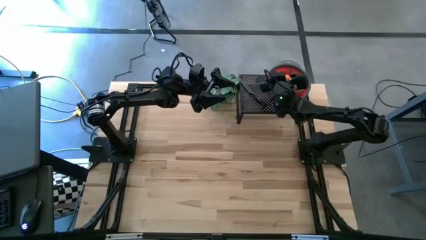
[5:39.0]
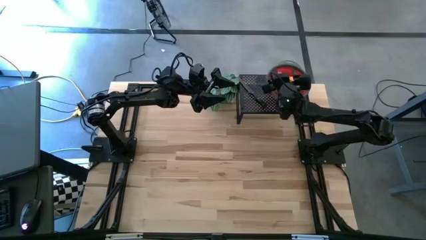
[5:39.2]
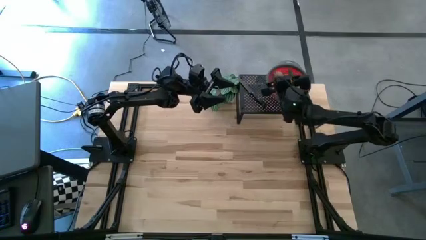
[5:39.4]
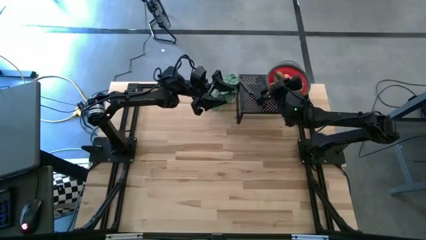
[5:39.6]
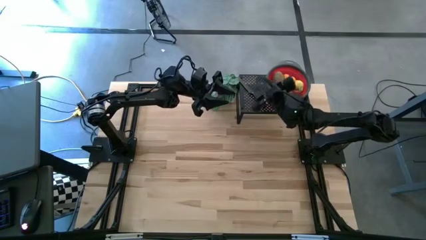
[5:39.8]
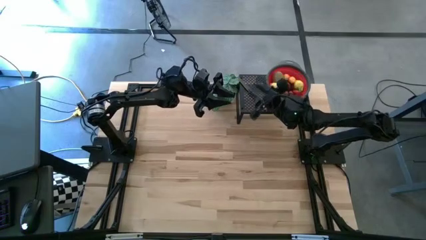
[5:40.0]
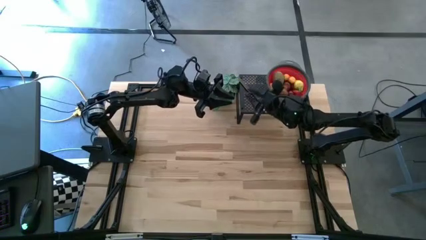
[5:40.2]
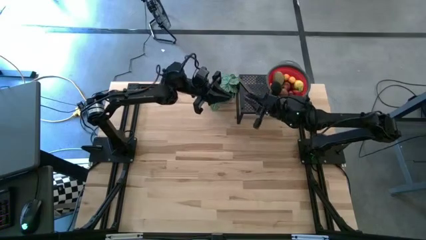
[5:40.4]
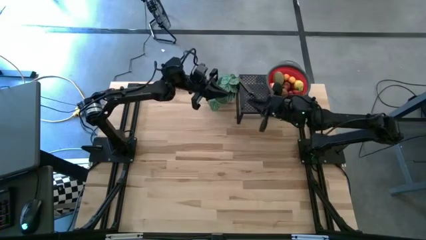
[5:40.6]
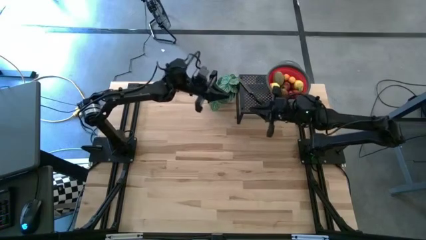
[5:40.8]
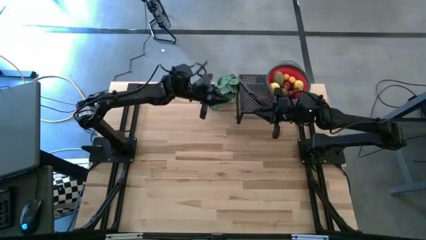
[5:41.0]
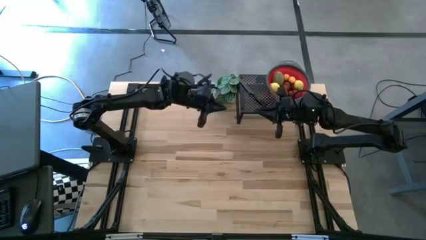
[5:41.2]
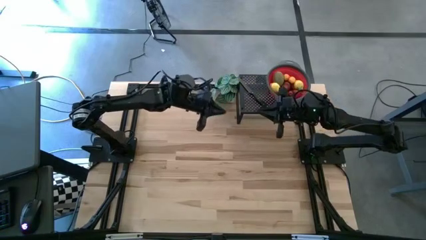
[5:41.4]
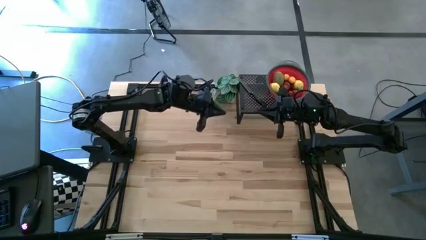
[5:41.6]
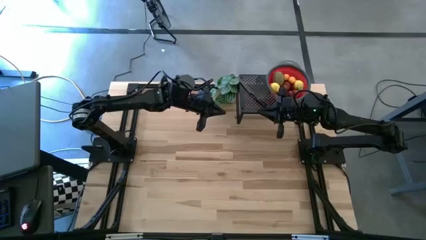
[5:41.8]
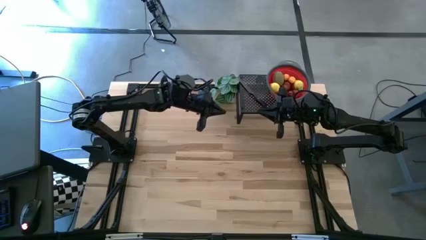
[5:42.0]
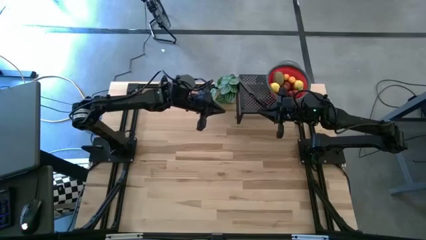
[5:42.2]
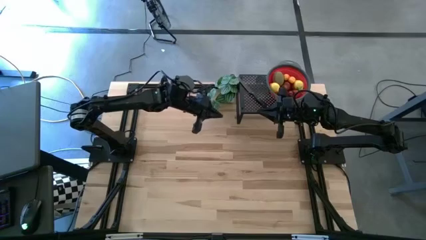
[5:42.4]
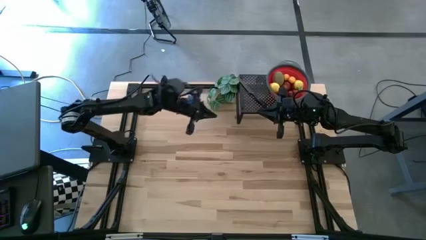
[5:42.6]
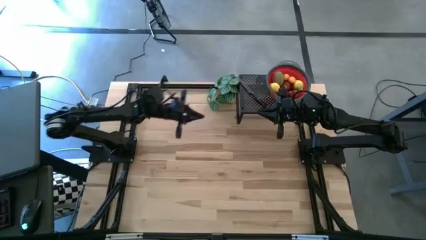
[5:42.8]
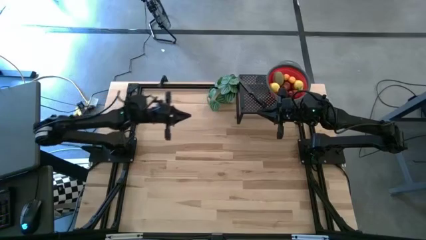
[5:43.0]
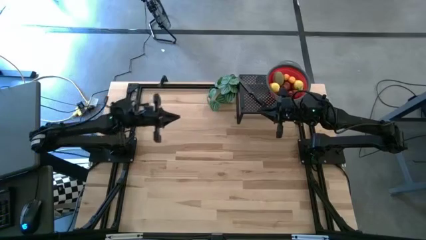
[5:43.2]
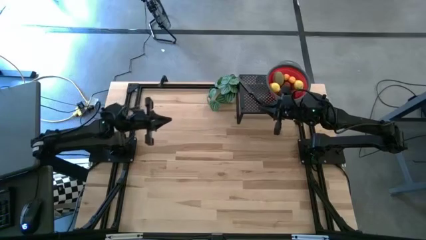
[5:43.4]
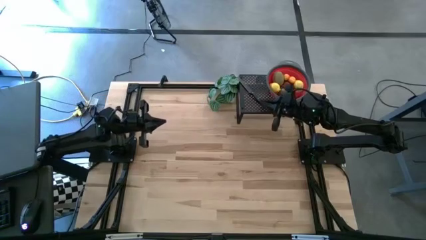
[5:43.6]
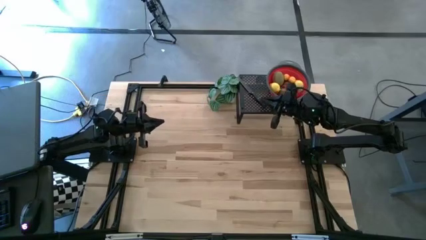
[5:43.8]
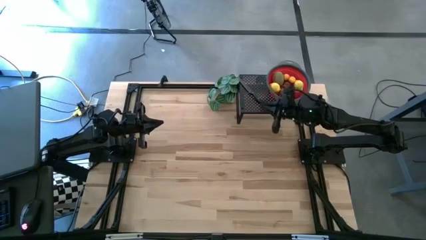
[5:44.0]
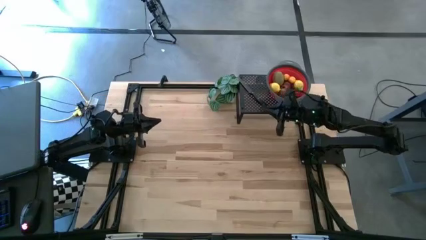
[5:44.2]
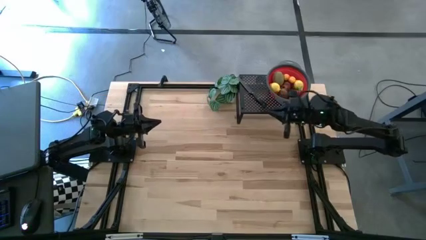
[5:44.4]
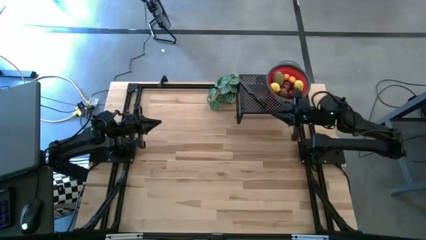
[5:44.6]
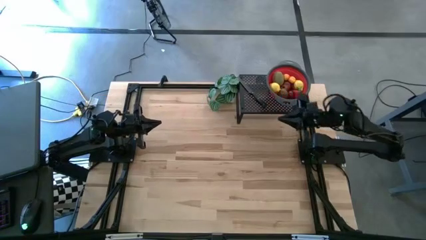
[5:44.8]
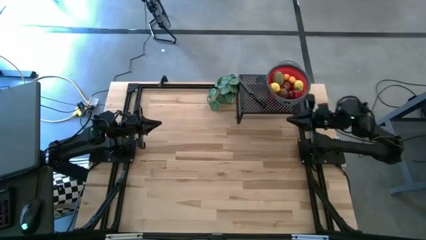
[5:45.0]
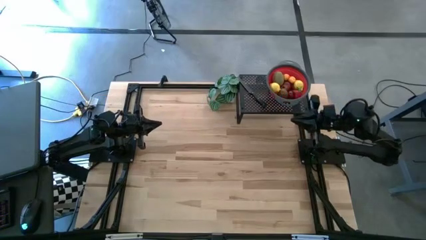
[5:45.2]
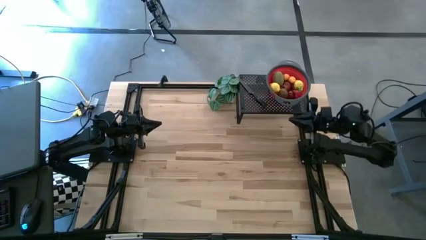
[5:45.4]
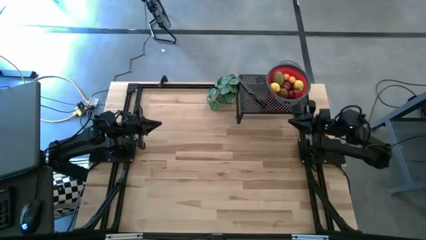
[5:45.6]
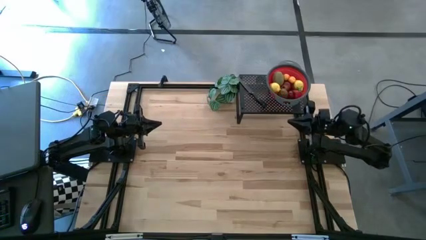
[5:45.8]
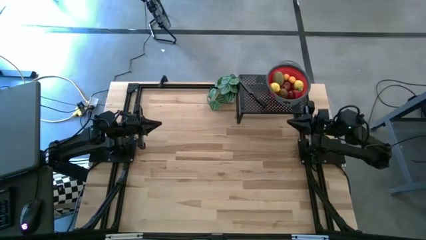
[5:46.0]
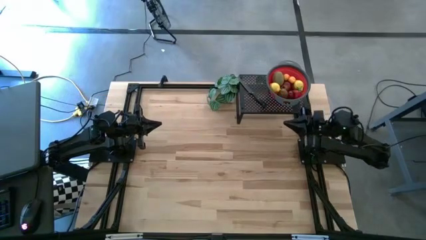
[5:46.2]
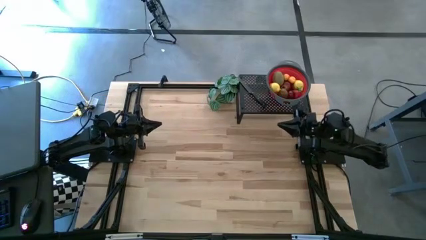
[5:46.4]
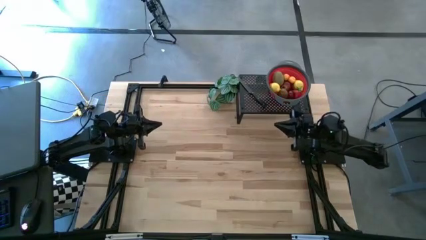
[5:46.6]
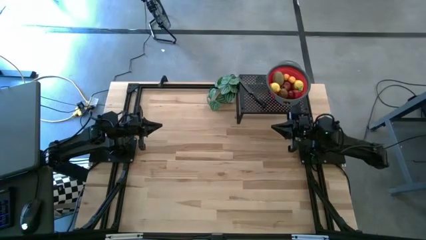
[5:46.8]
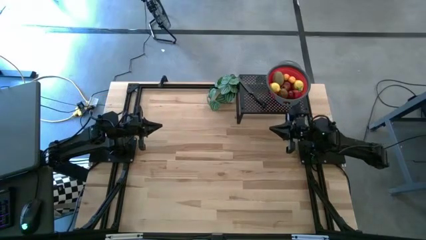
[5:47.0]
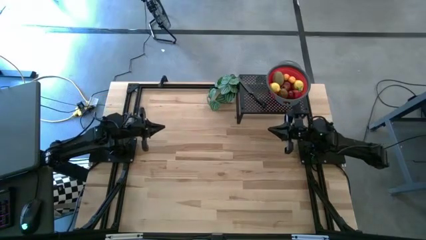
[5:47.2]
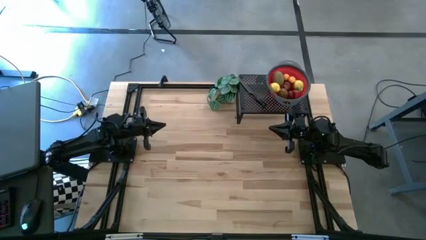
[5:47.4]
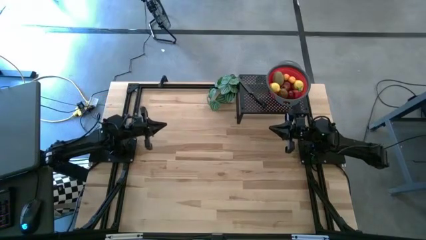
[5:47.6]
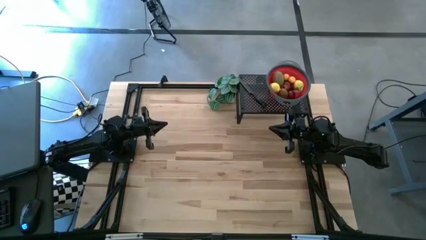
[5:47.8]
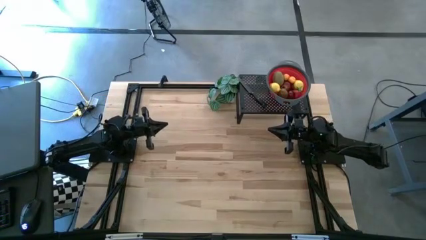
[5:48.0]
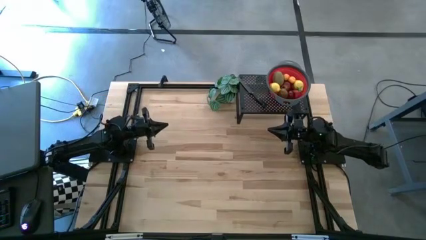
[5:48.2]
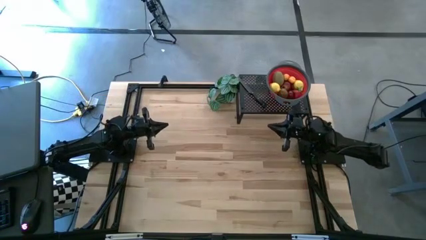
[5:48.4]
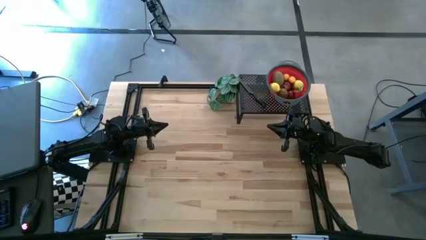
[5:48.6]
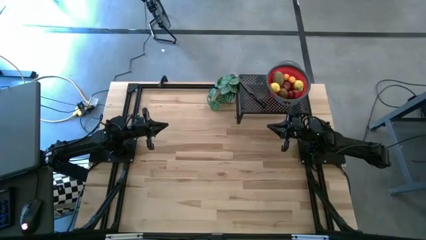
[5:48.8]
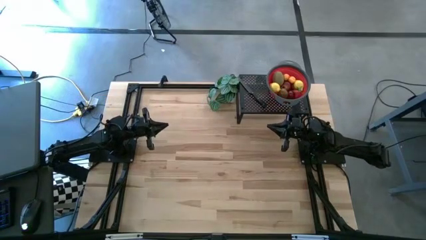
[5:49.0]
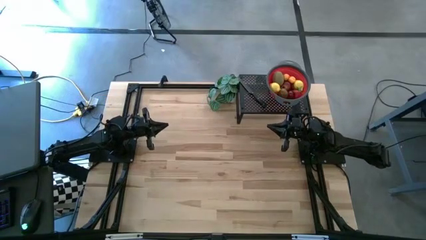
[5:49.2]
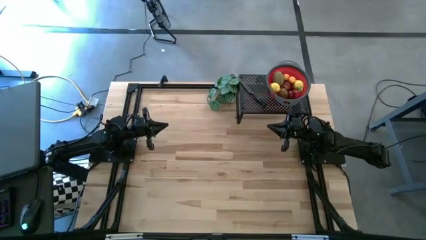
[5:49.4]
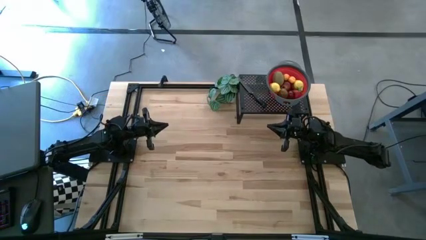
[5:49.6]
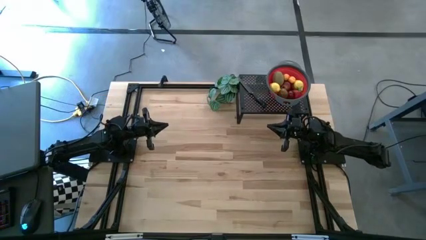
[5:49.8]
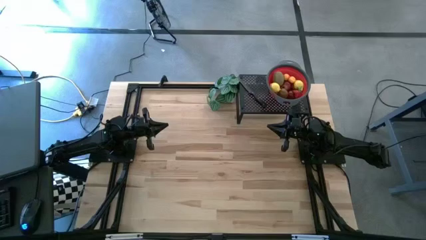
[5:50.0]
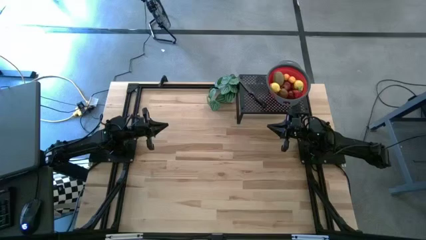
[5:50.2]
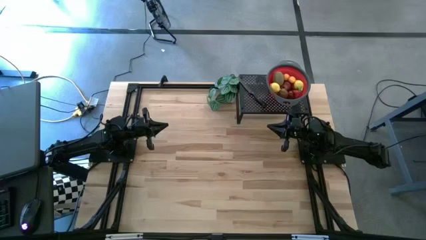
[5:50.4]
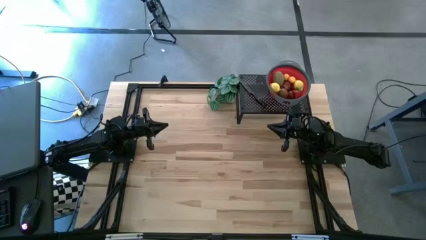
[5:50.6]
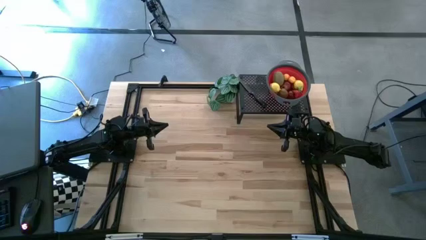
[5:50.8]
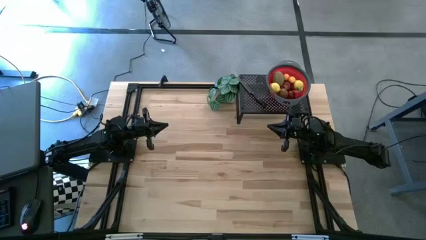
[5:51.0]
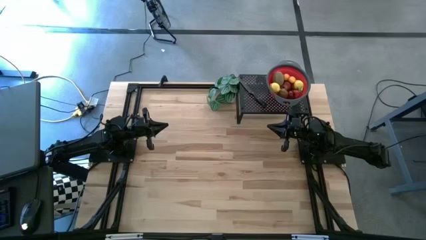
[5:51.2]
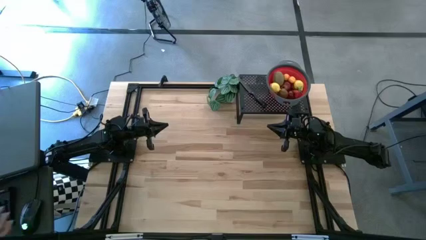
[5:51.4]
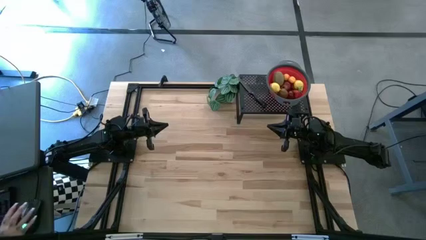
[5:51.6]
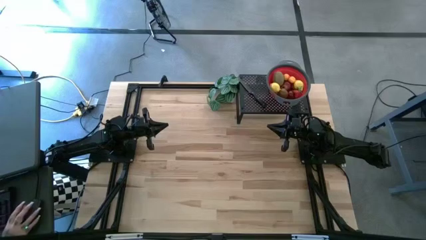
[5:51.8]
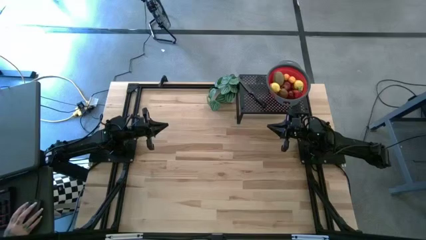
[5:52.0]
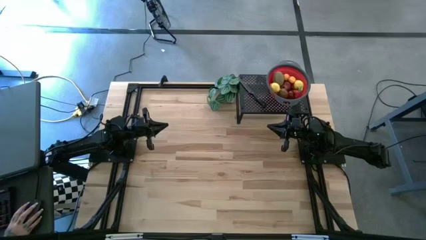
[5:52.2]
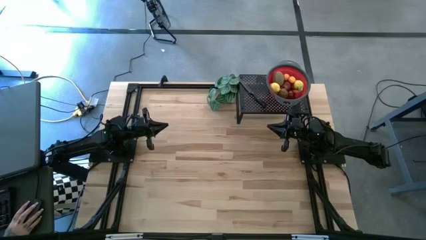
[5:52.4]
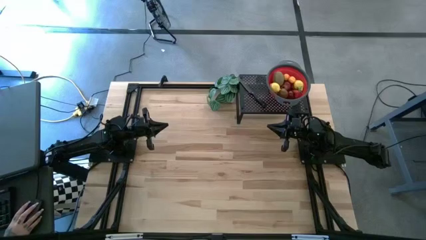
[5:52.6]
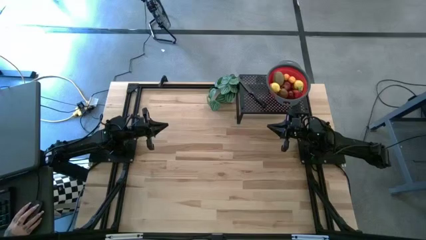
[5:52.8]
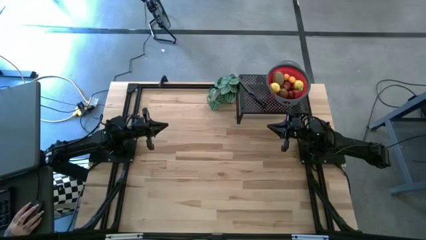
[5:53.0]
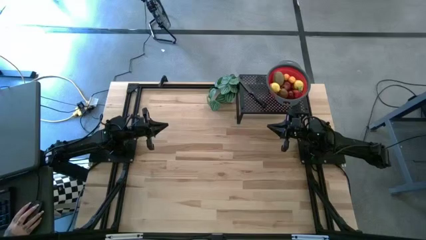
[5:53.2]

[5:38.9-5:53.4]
Task: Pick & Place Fruit
Return to Home Position

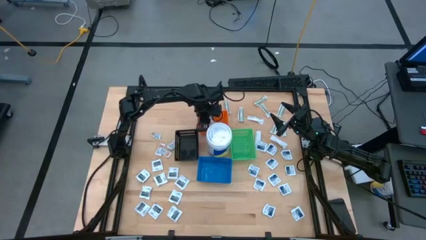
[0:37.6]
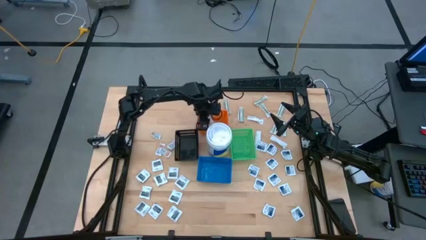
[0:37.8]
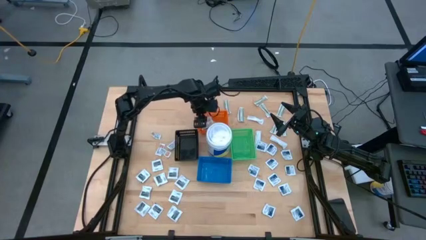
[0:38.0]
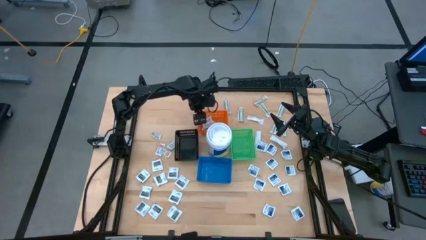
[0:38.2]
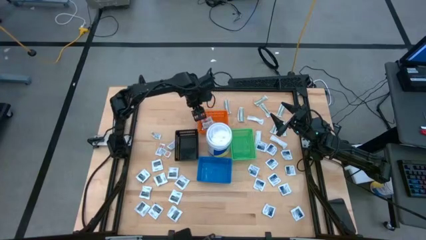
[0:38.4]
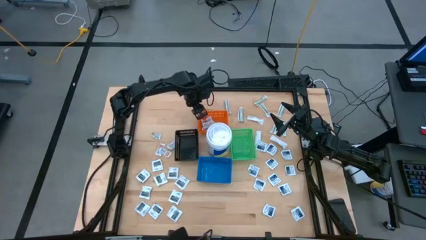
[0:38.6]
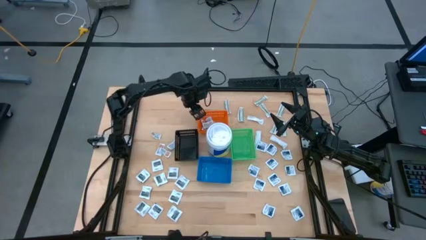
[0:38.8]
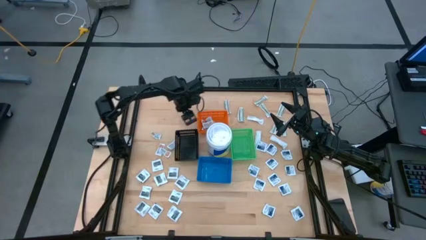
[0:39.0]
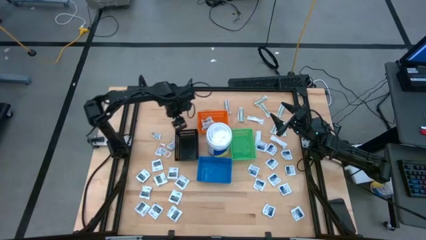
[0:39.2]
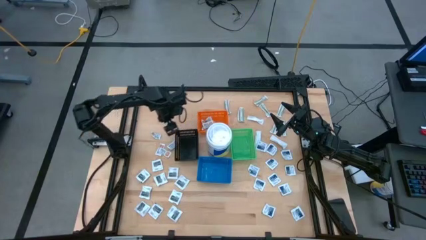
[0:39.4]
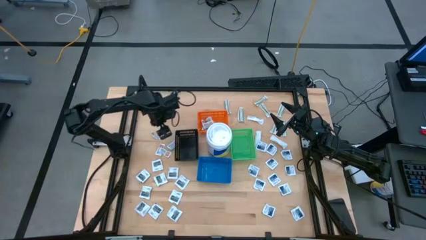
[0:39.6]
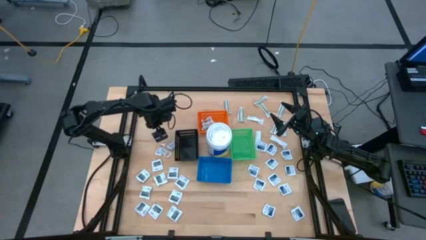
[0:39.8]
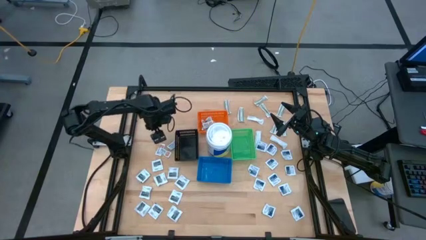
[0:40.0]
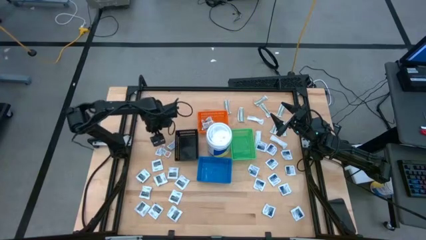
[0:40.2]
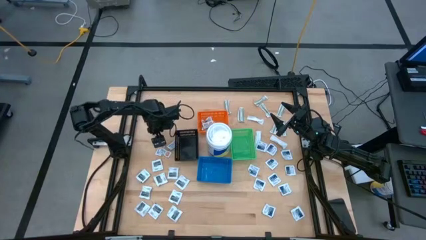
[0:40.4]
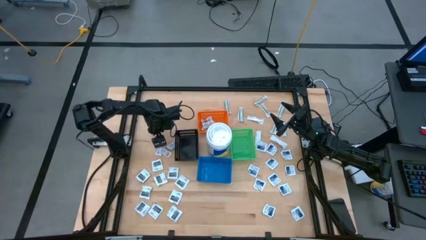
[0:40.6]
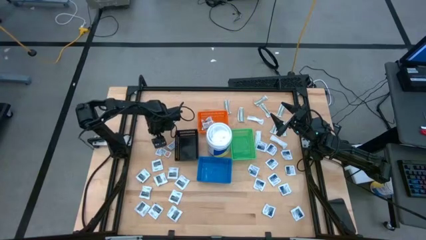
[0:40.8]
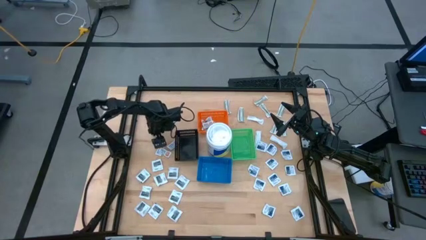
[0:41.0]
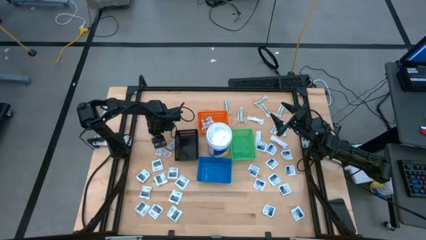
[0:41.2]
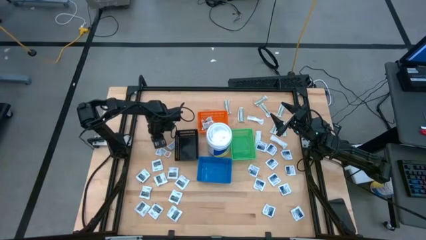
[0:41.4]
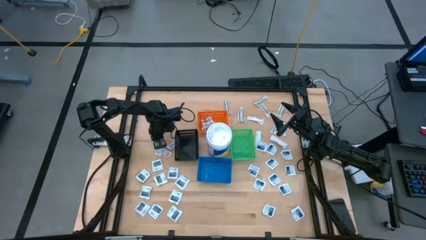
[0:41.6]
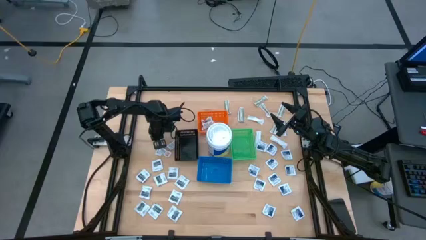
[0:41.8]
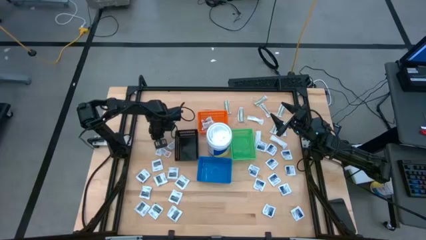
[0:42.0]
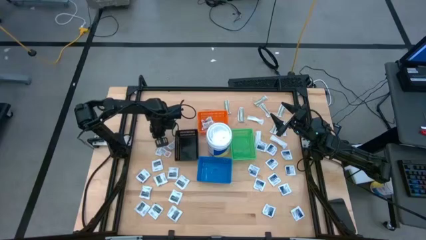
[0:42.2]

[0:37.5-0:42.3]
Task: Pick & Place First Aid Supplies
Put the orange ointment pack into the orange bin
